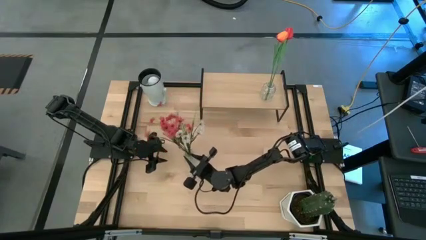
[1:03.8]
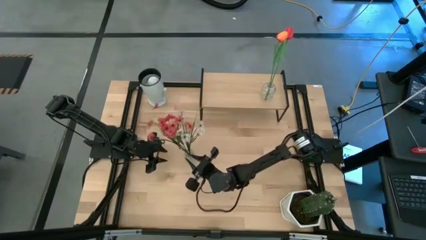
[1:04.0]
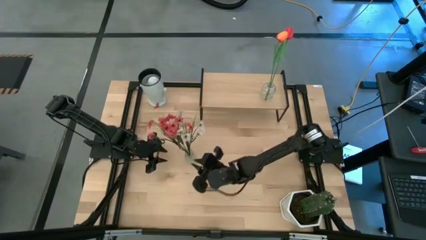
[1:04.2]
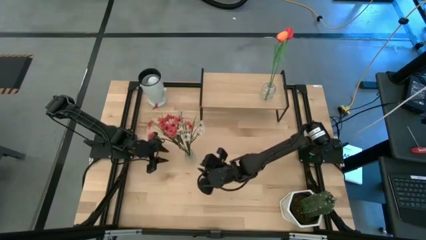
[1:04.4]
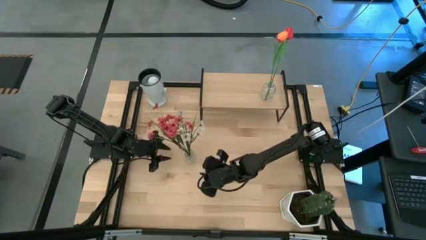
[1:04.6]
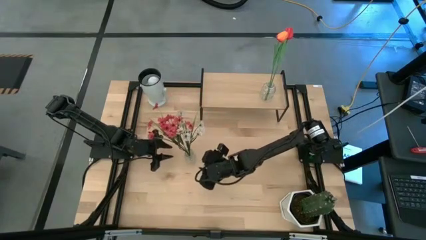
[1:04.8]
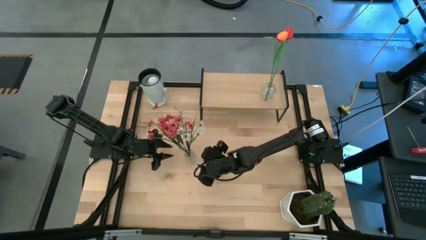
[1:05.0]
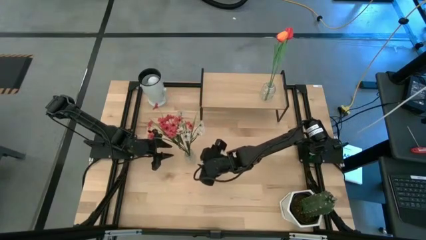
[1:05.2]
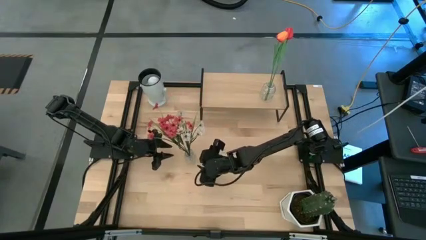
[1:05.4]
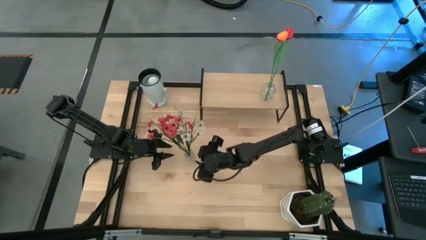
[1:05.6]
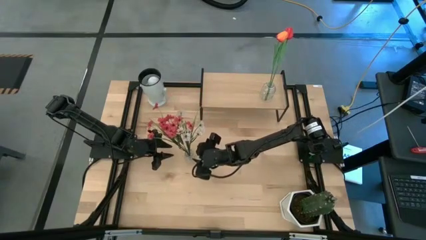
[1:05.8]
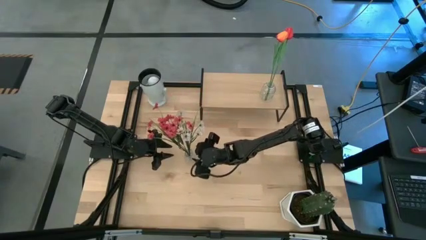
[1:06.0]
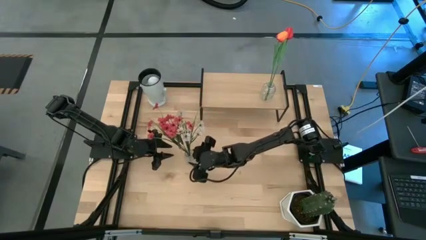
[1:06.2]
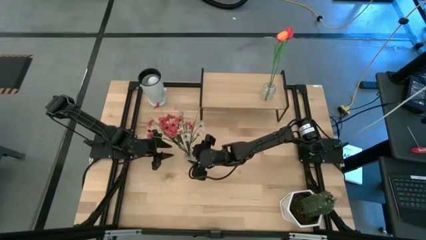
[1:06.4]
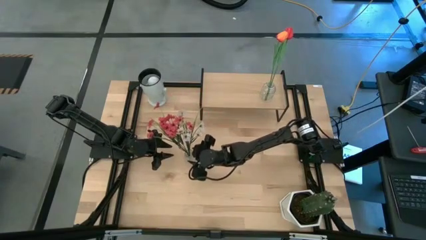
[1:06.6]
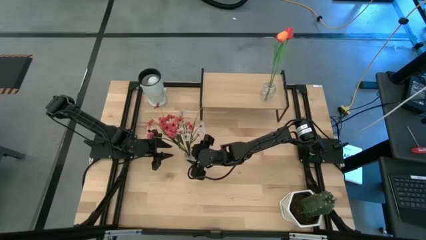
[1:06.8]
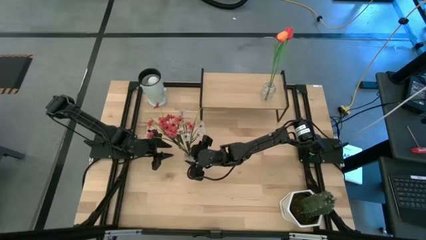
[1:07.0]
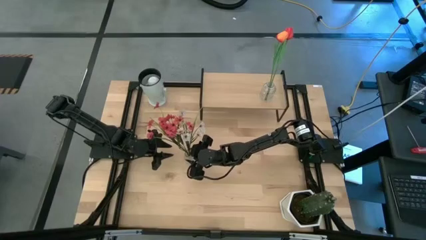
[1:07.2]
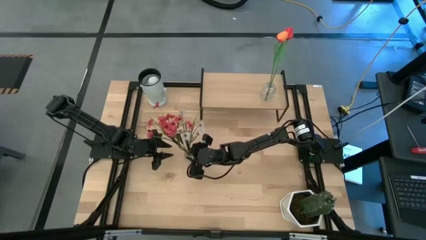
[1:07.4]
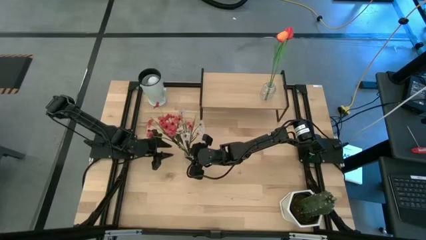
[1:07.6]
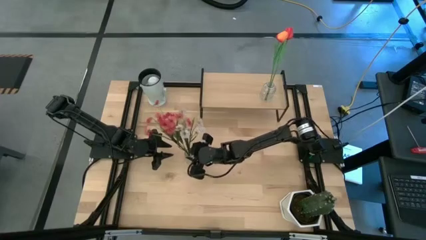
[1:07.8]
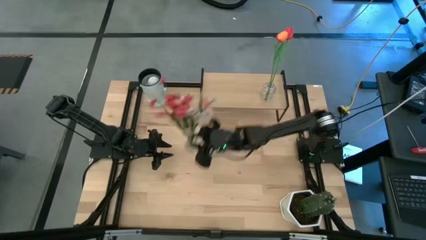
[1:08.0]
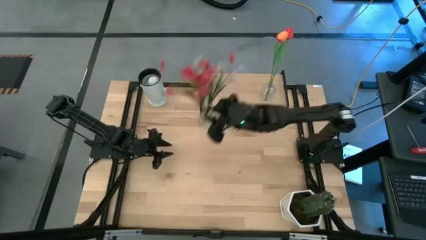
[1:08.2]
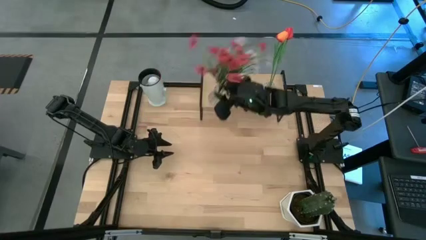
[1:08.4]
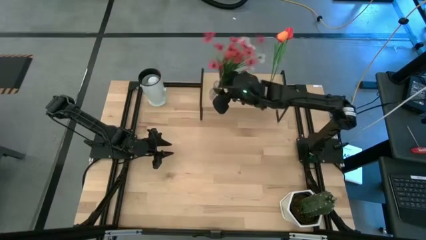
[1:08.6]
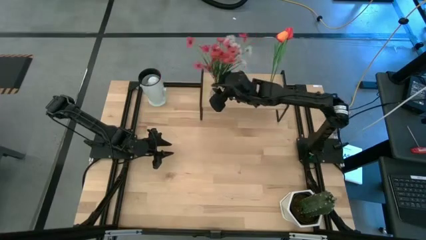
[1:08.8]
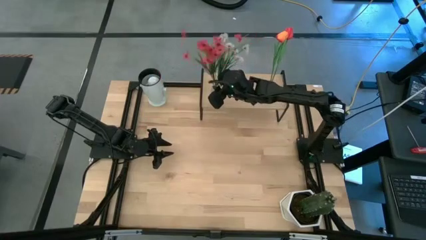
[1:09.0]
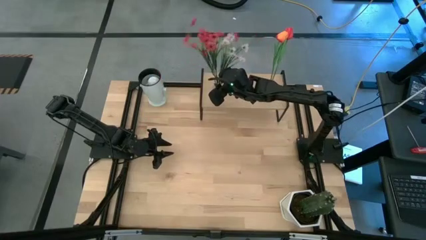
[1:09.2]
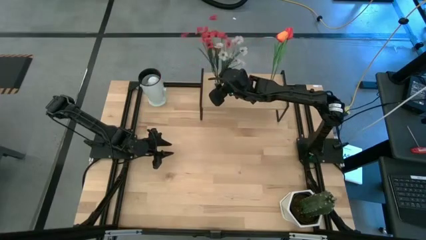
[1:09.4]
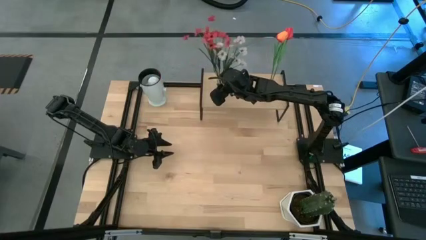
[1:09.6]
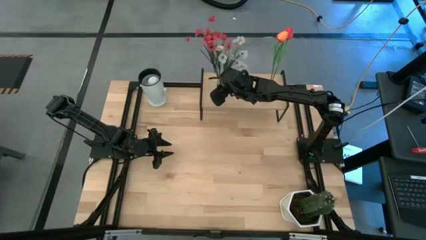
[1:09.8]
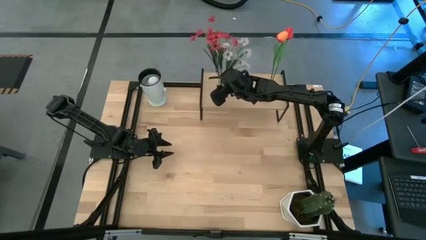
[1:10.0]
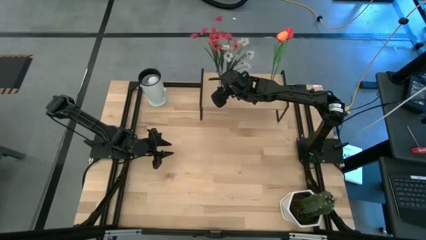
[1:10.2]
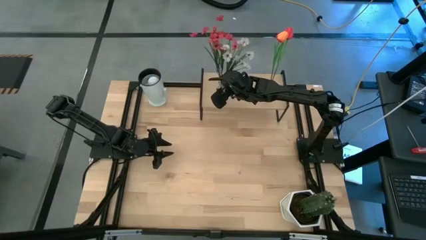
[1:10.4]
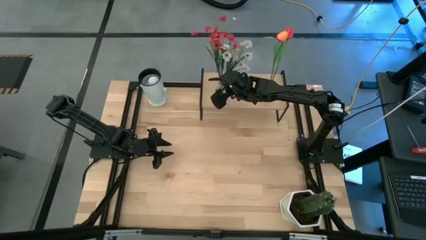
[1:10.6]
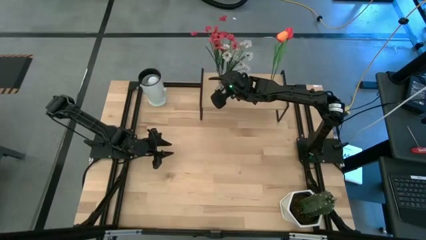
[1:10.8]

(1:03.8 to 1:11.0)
Task: Pick and place flowers into a vace then onto a shelf
Put the flower vase on the shelf

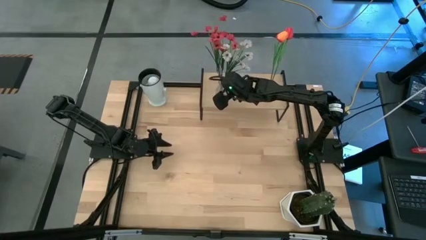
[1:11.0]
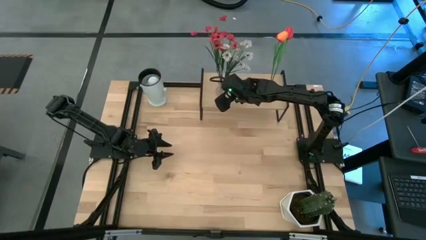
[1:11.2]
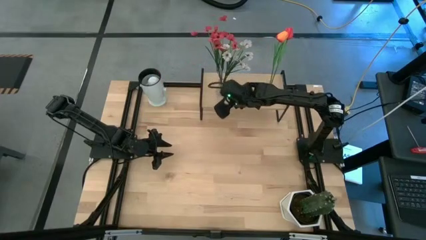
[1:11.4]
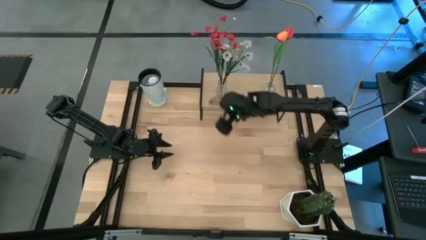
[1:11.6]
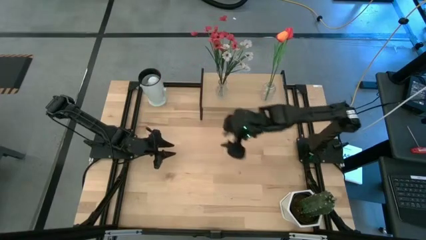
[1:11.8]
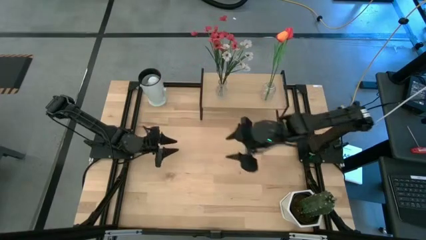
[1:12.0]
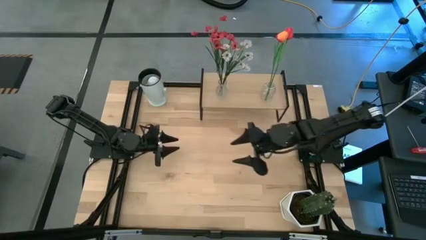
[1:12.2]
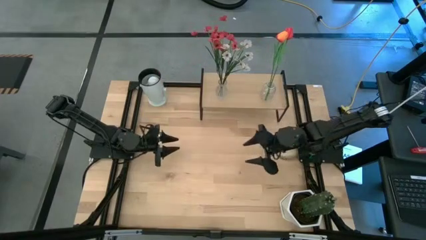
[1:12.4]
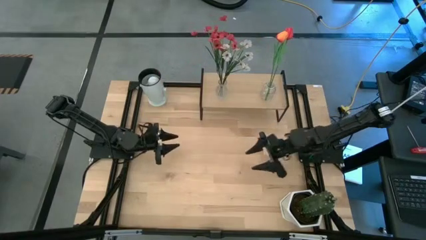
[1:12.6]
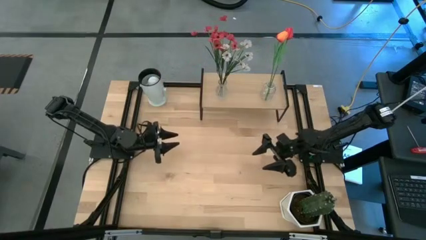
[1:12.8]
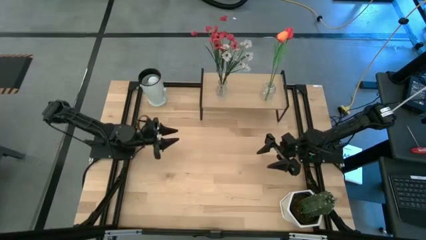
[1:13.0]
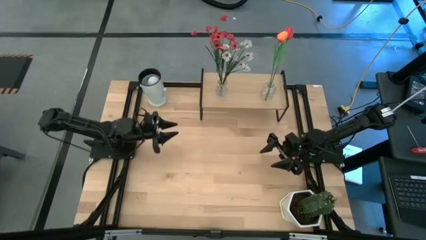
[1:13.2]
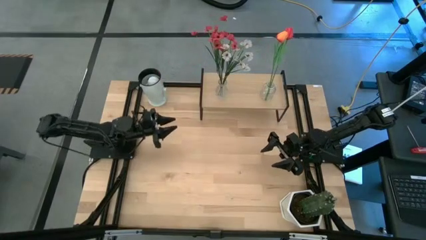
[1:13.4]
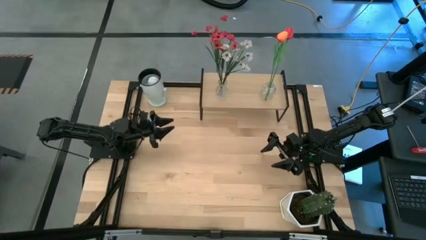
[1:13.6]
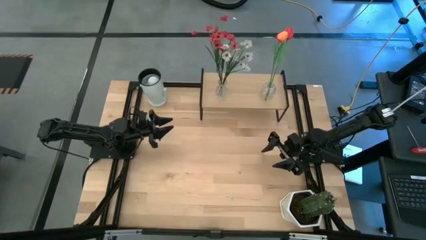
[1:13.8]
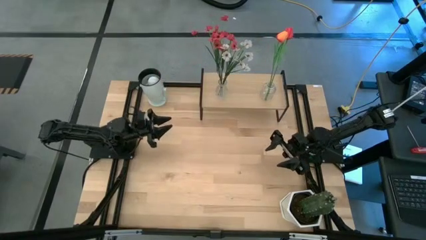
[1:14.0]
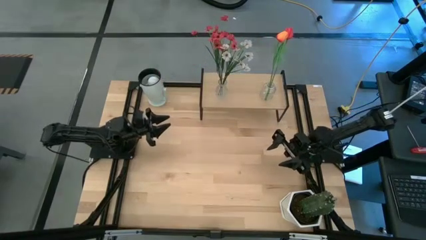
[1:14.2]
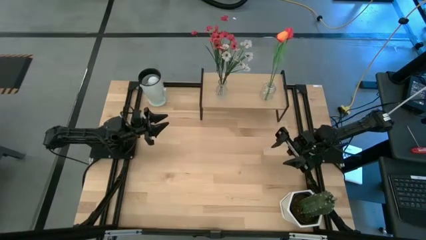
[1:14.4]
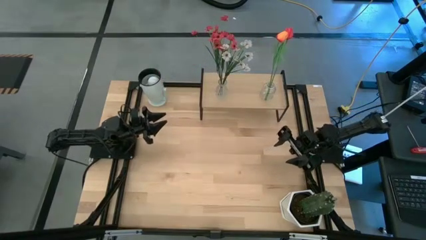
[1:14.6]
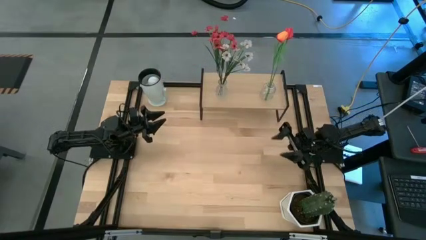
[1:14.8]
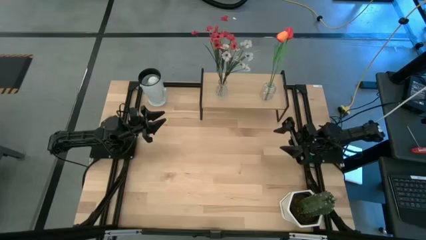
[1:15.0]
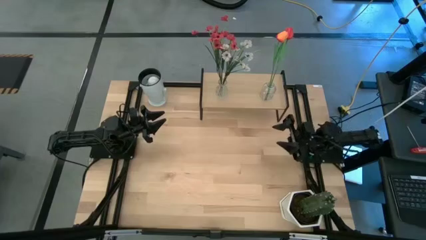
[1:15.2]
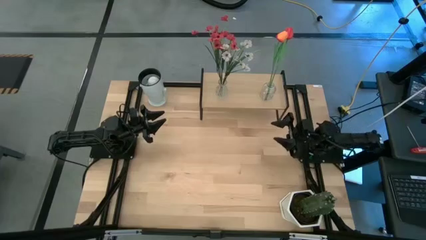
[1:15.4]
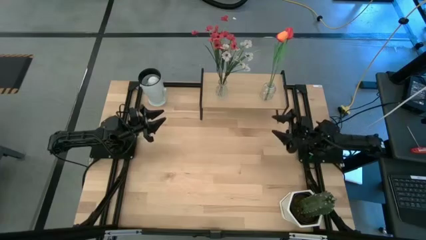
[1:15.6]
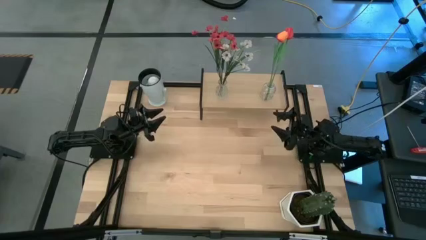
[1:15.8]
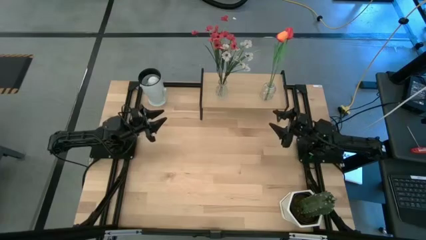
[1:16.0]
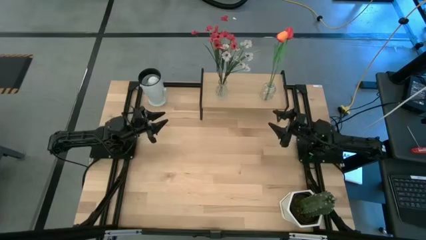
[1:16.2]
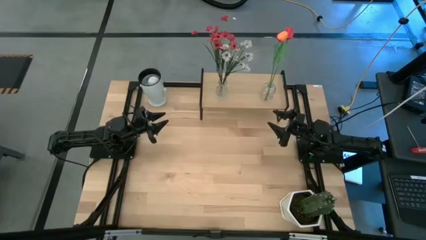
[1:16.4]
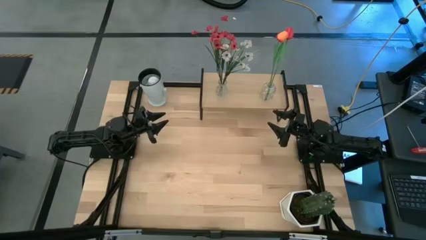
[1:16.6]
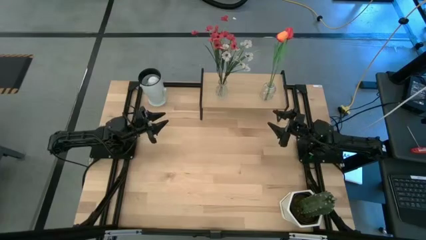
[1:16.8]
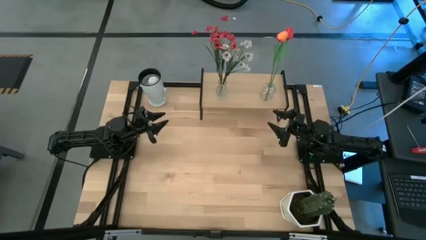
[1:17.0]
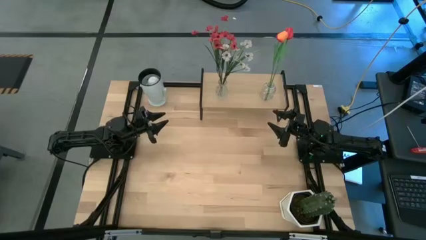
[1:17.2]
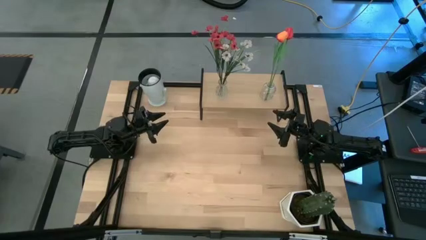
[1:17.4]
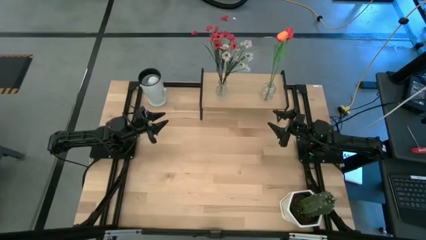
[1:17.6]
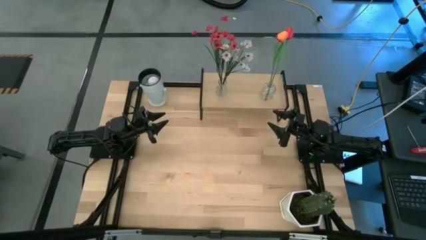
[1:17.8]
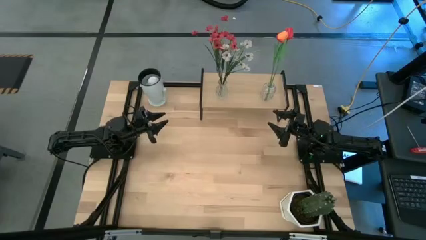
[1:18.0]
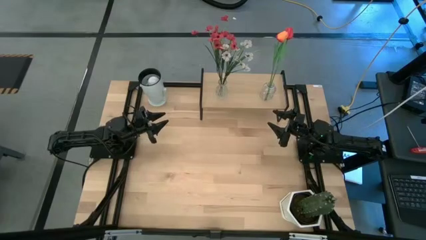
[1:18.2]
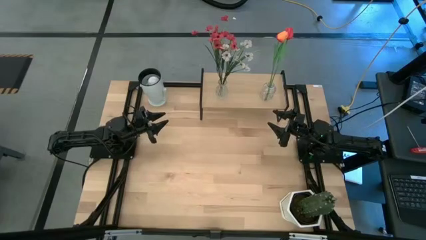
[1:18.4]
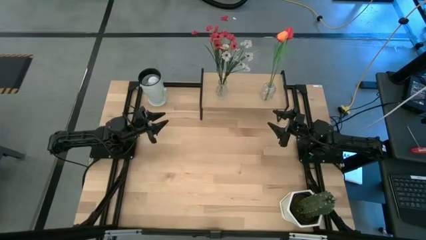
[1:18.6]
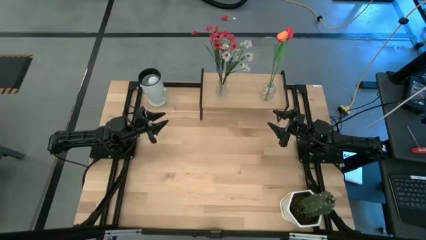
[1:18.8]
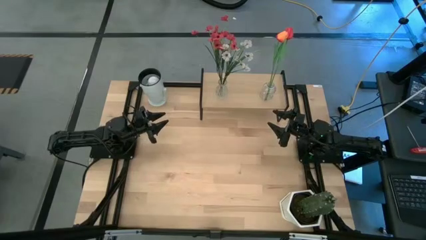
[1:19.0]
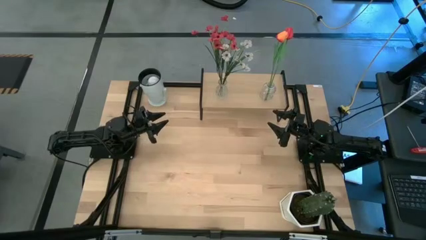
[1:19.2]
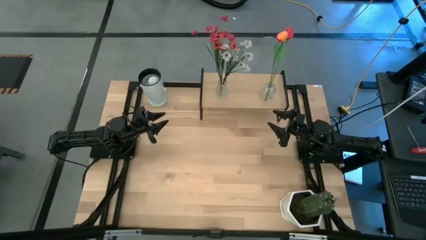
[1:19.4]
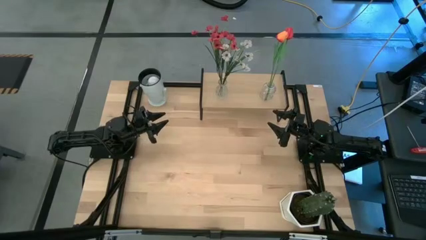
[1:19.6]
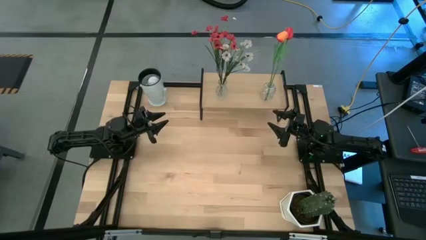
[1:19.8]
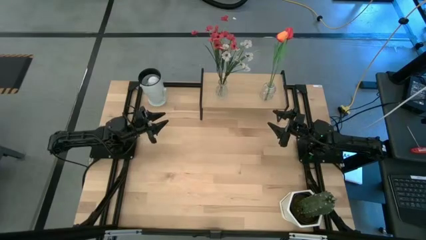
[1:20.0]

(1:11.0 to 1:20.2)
Return to Home Position

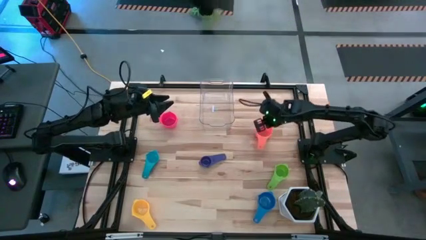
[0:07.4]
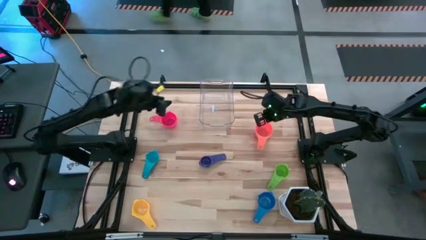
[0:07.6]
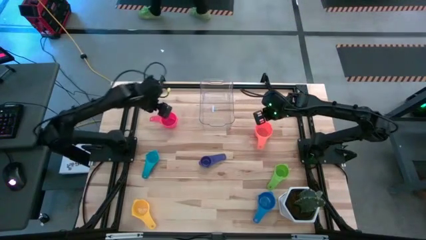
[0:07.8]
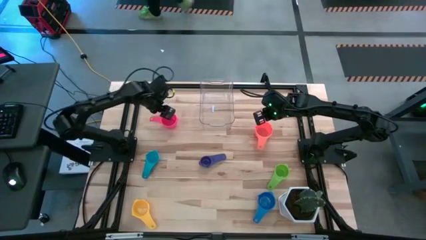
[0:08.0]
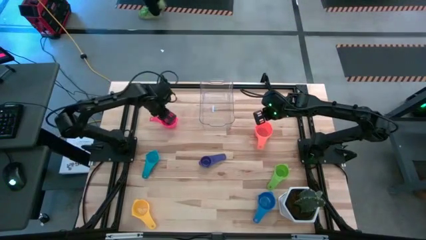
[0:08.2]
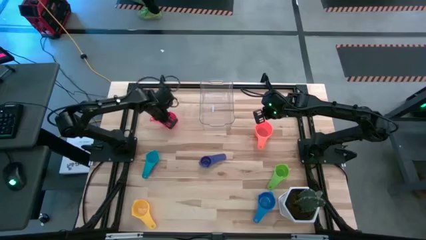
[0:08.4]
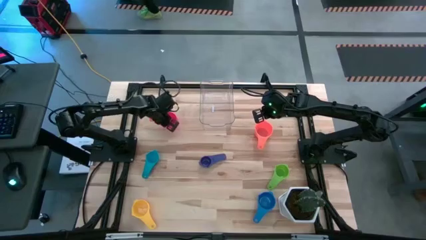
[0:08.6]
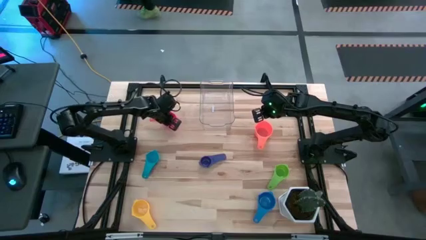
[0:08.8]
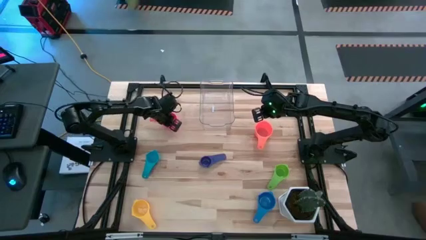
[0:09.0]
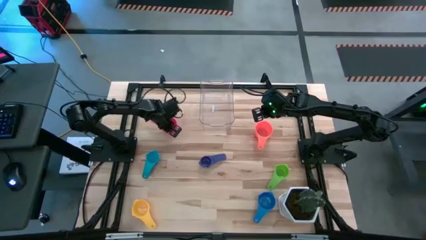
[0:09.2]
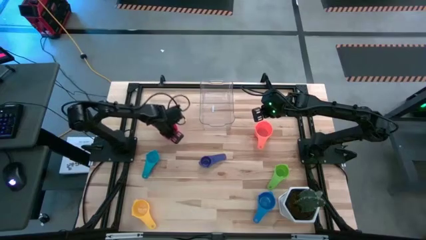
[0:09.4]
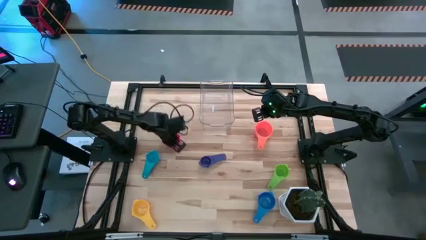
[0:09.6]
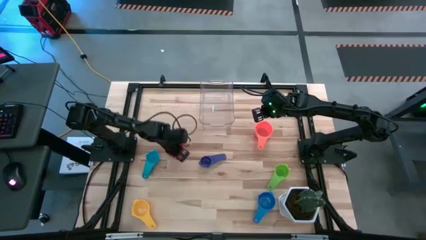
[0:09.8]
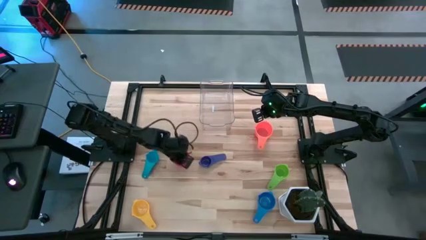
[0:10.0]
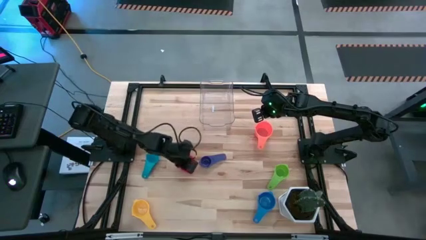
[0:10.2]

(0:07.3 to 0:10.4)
Task: Nest measuring cups in basket
Adjust the pink measuring cup
